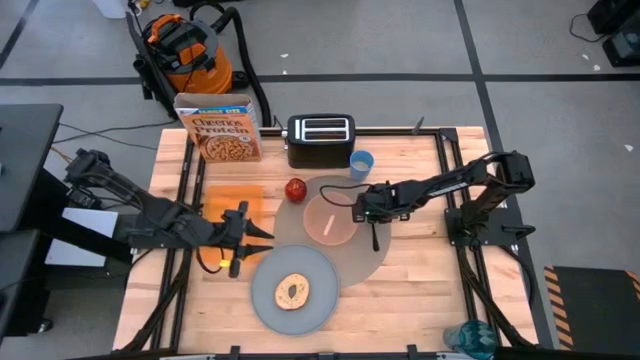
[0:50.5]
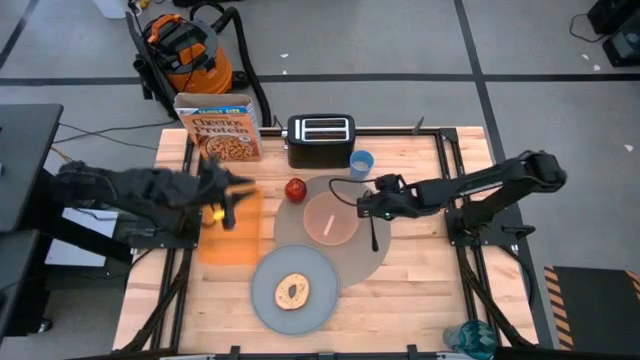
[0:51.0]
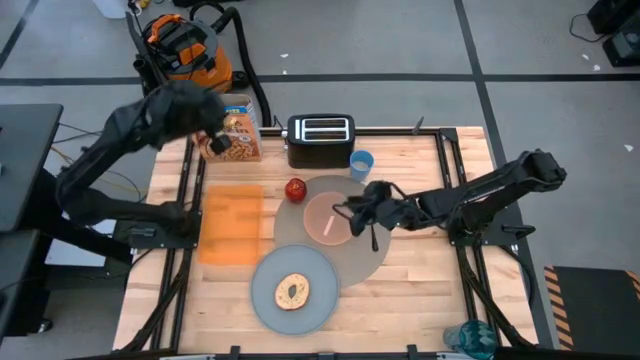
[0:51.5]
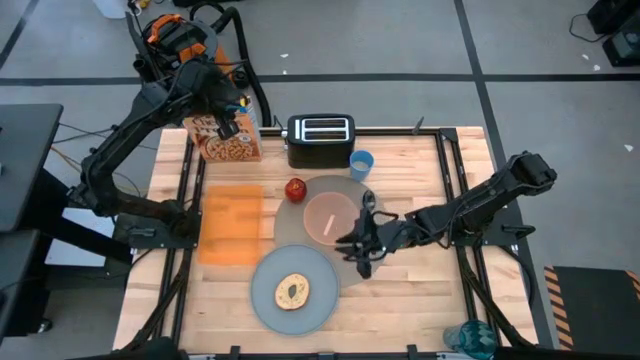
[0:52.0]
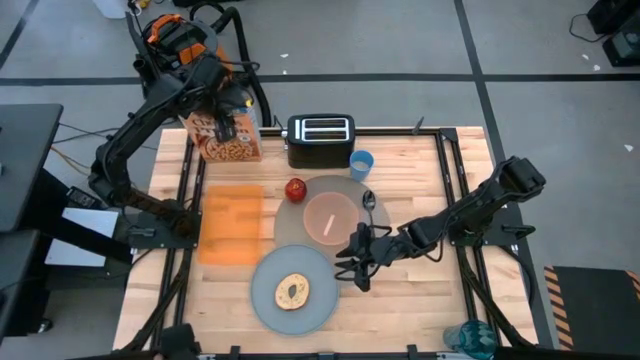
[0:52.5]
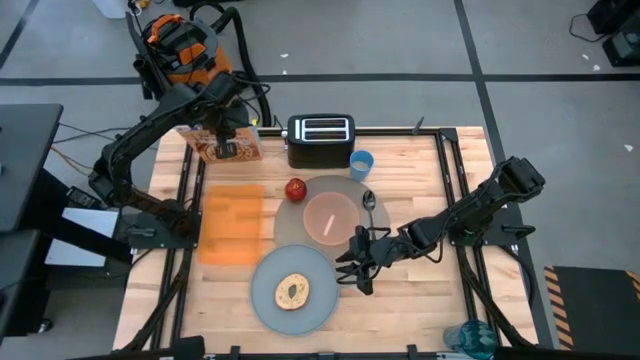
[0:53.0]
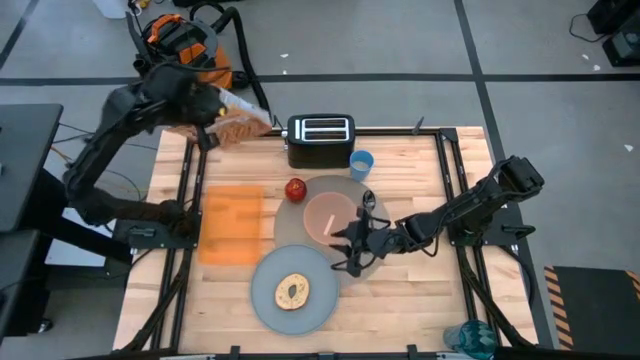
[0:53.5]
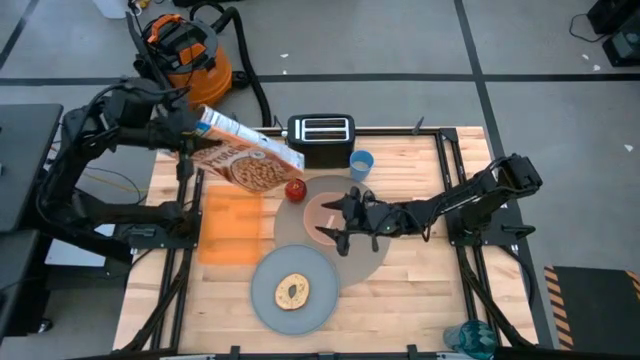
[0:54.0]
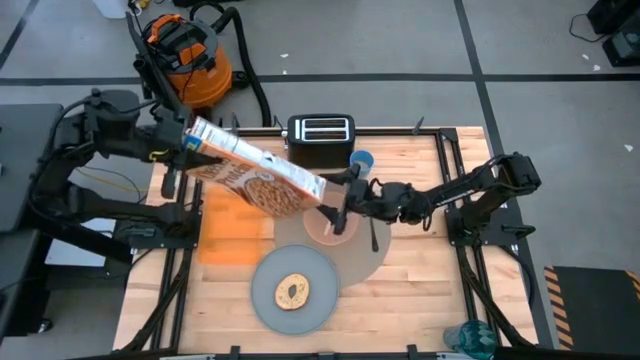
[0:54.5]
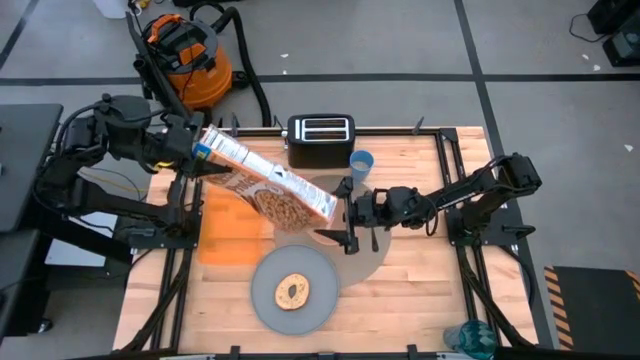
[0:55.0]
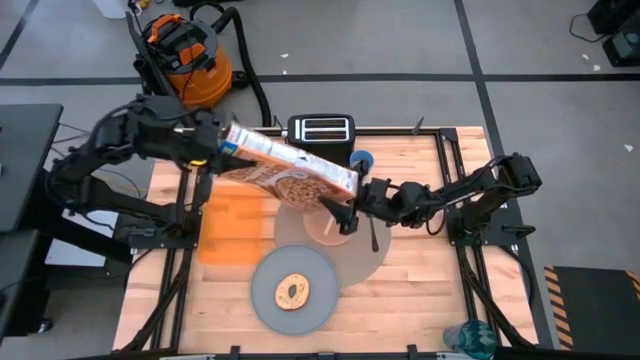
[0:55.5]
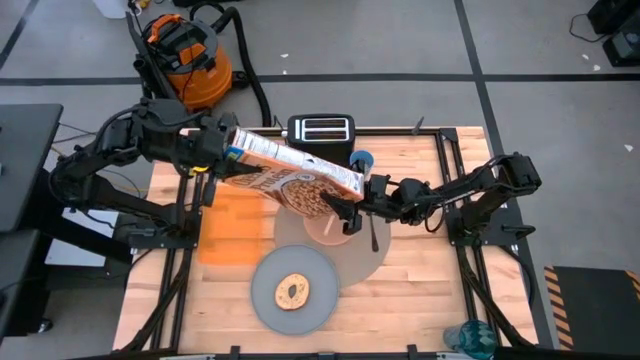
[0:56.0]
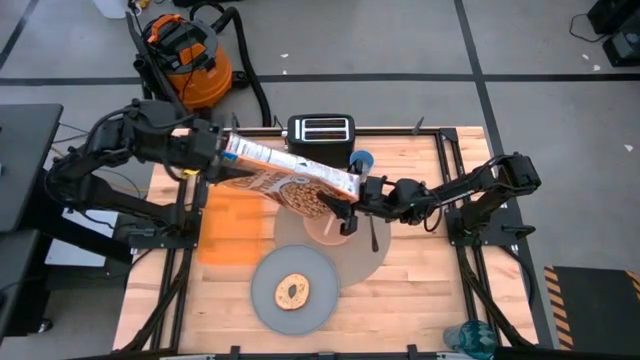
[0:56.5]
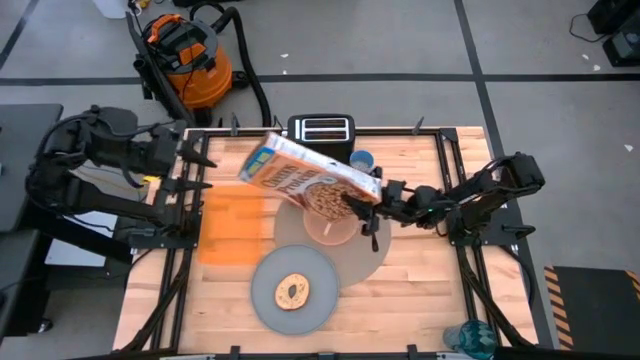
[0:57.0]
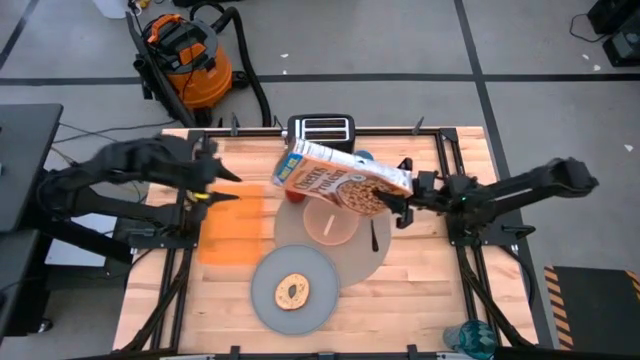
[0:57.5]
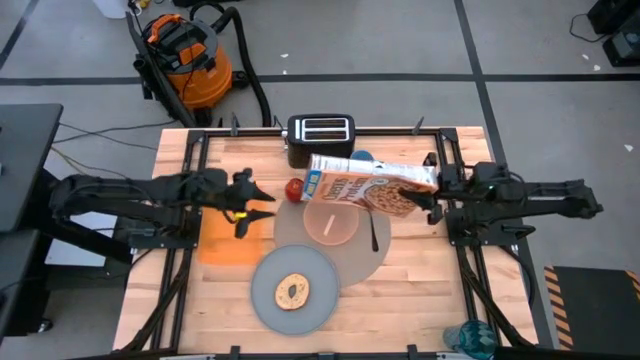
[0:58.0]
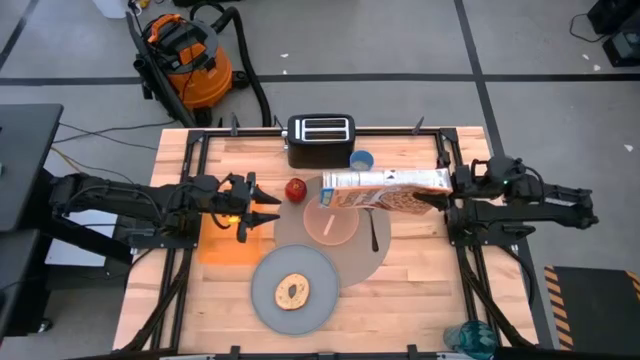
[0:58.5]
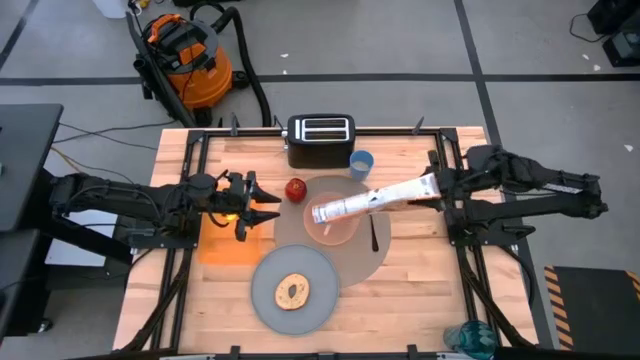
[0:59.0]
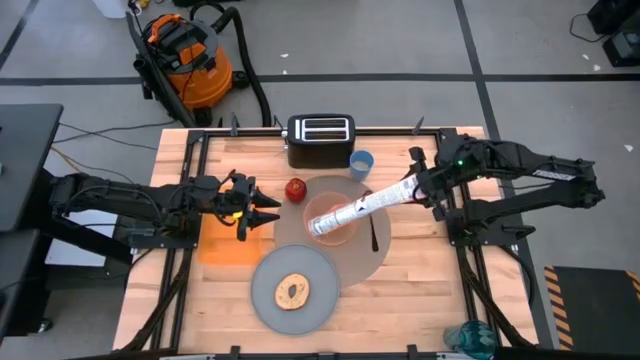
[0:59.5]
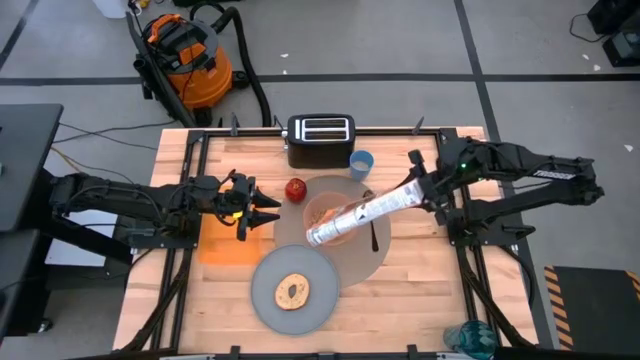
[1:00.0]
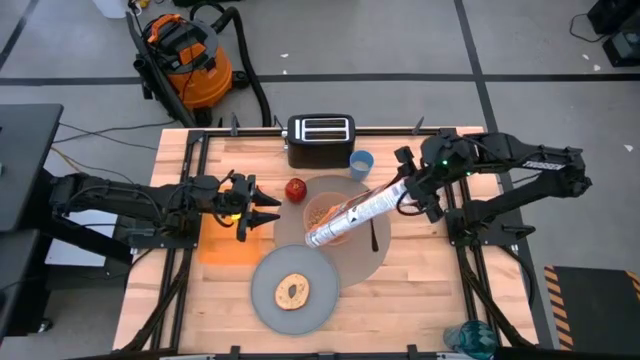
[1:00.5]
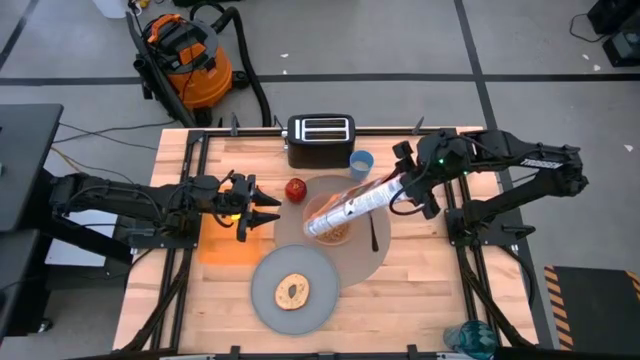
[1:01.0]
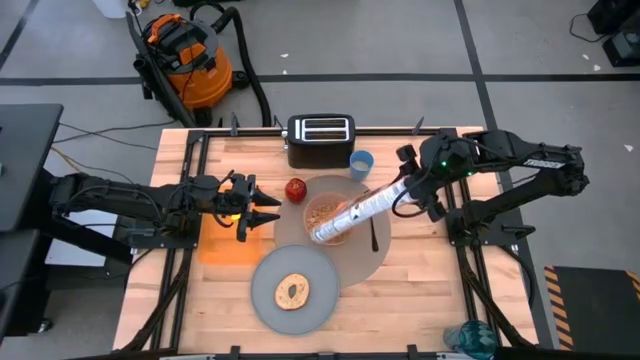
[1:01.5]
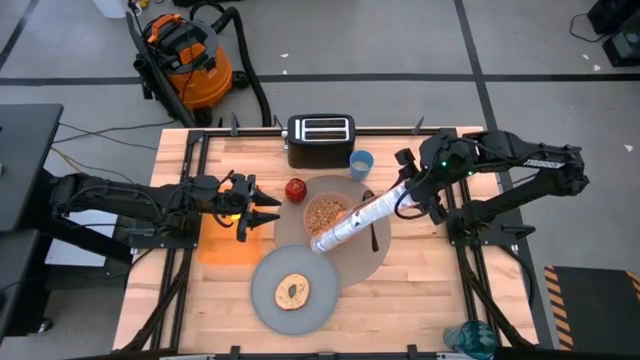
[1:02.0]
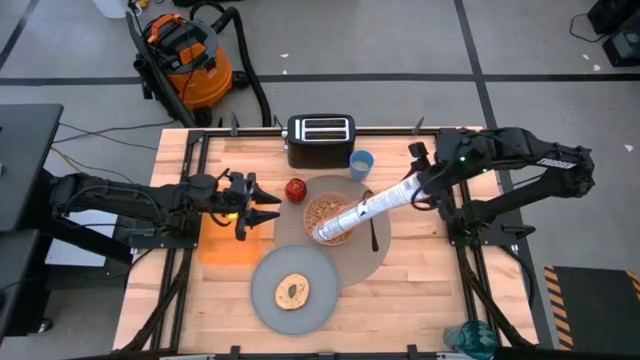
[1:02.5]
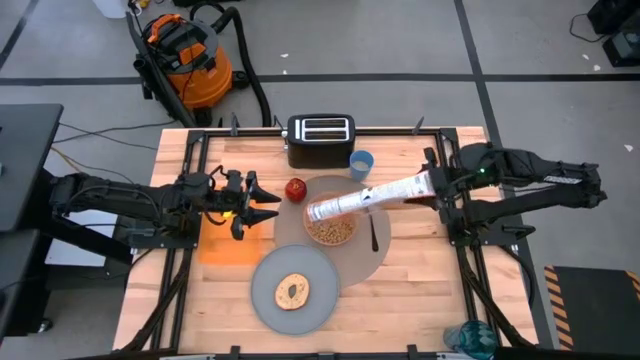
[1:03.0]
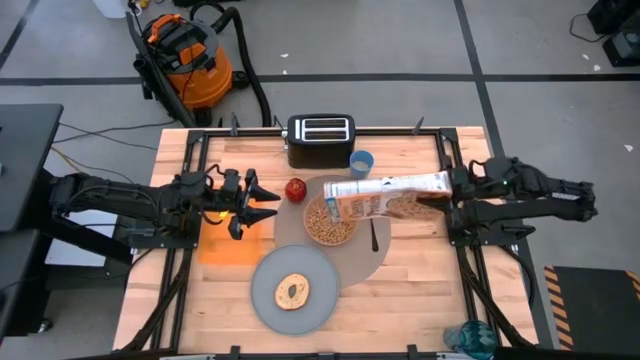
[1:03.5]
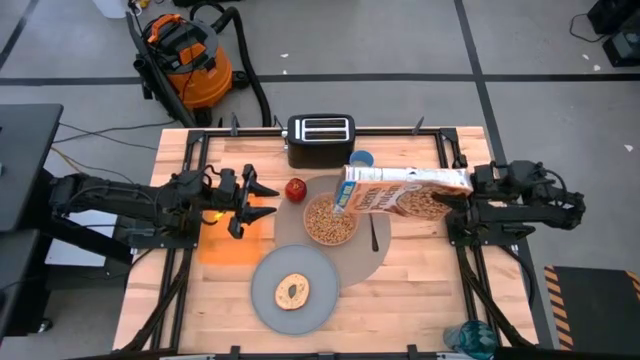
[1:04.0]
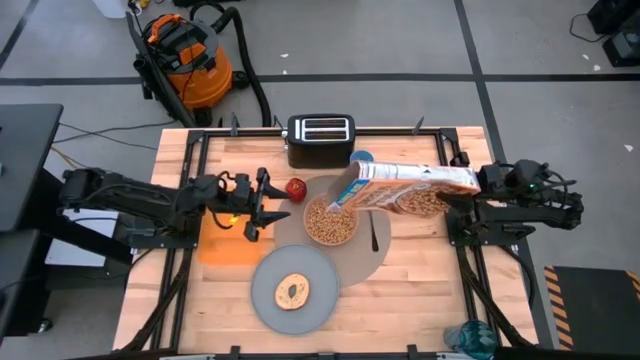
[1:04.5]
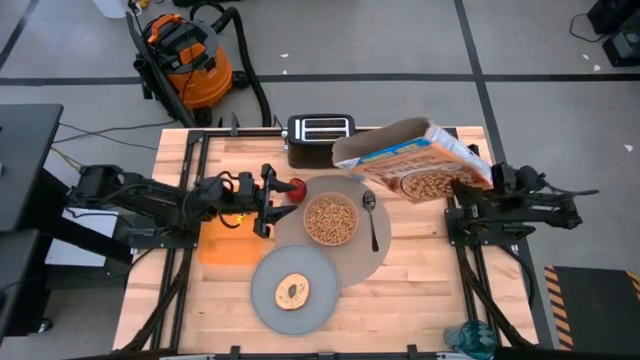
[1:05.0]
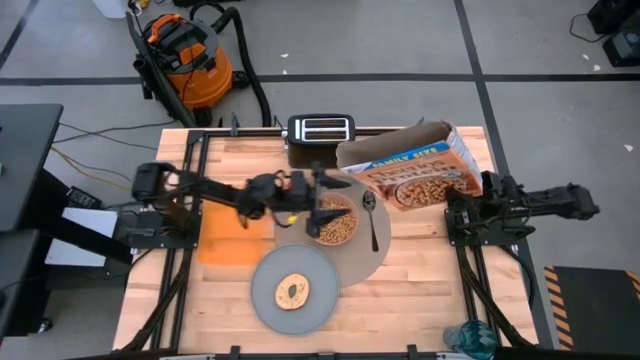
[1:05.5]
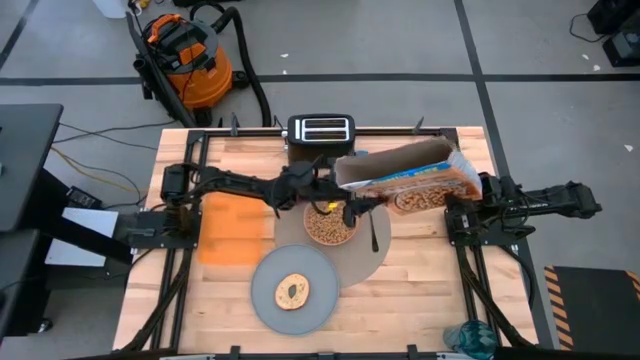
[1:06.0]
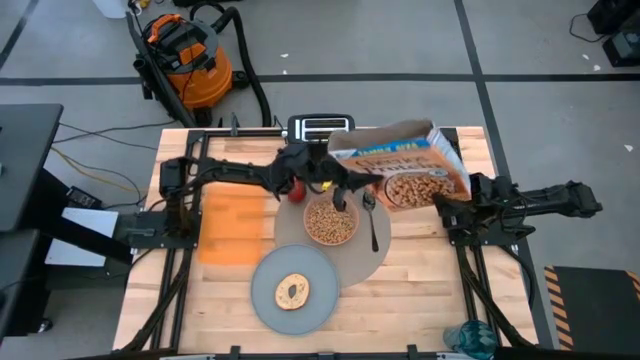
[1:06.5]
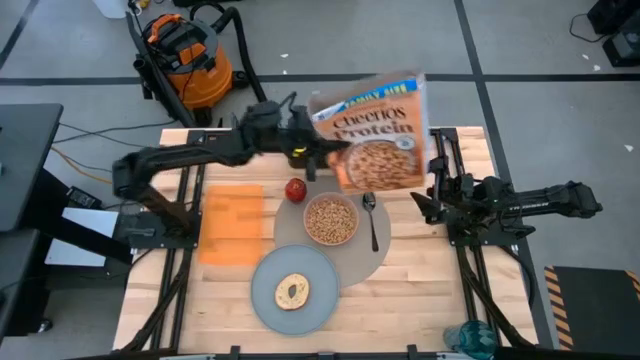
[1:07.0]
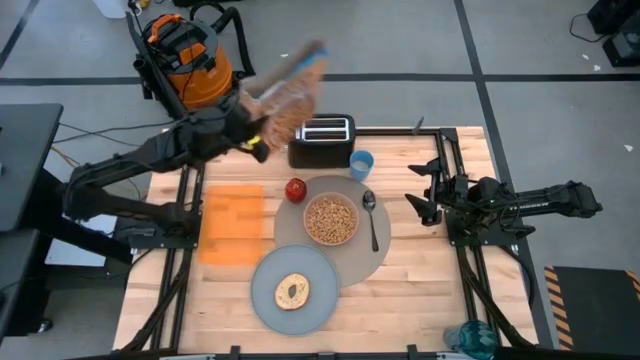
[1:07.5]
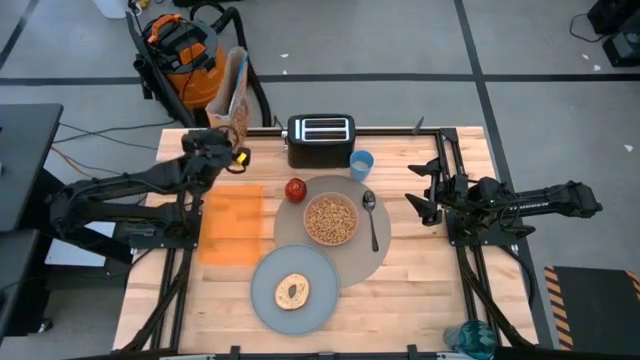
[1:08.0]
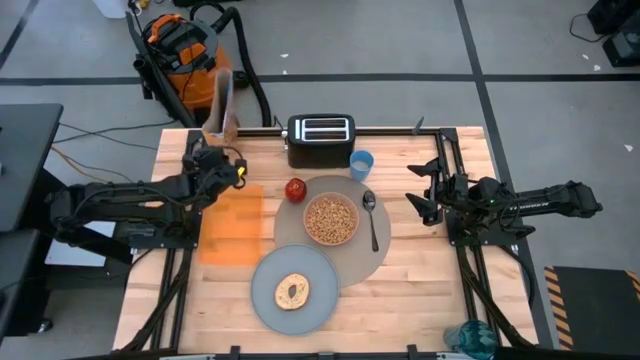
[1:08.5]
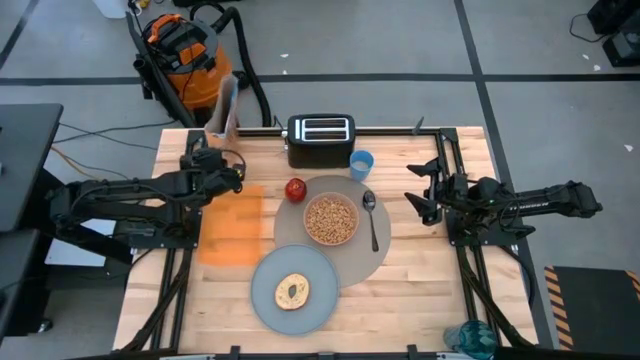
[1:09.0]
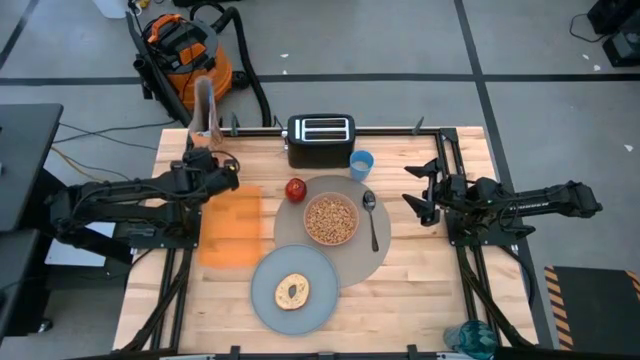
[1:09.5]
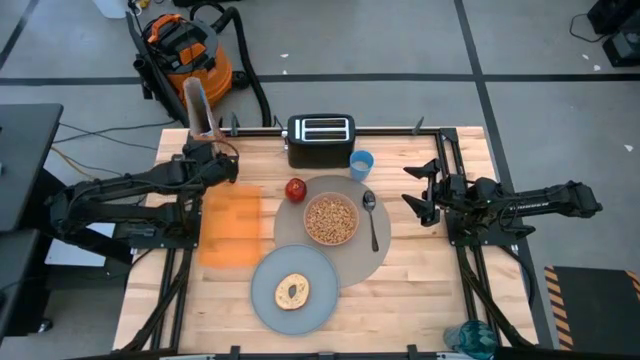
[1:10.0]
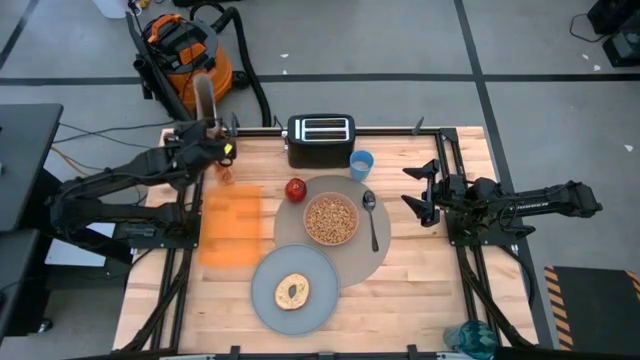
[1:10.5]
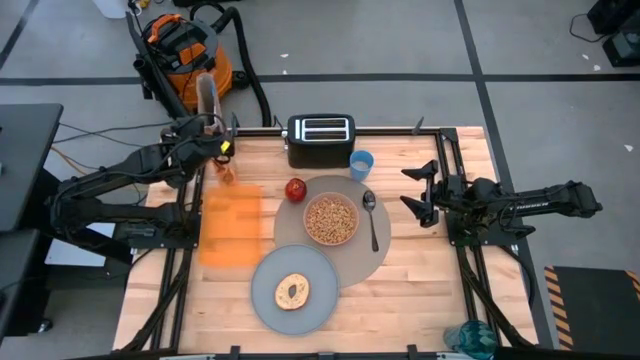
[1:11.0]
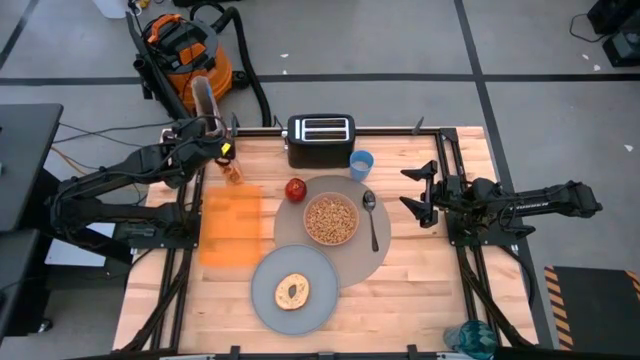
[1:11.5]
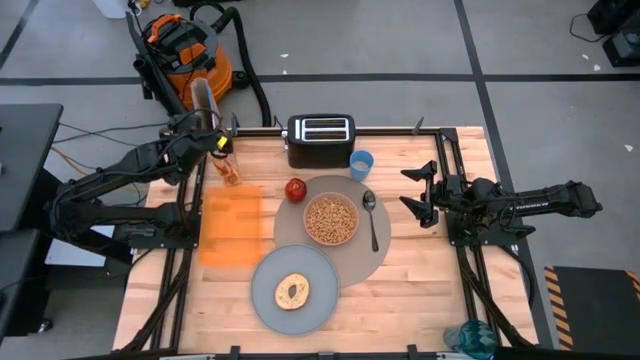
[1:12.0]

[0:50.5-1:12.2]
Task: Arrange a breakfast setting
Put the cereal into the transparent pink bowl
